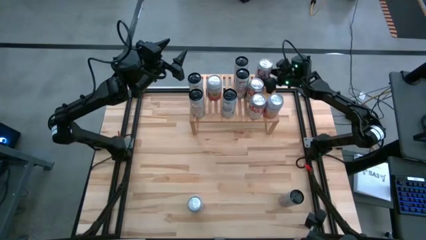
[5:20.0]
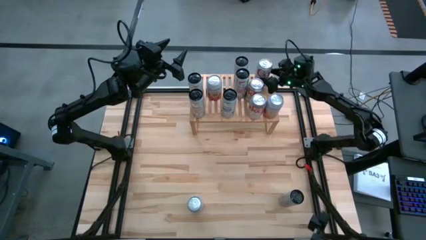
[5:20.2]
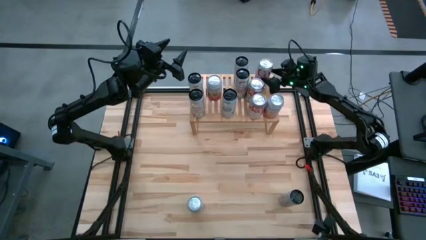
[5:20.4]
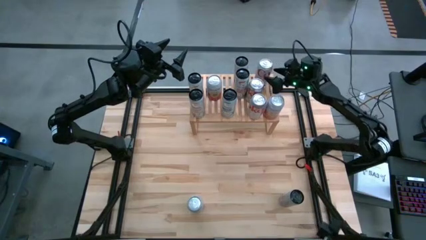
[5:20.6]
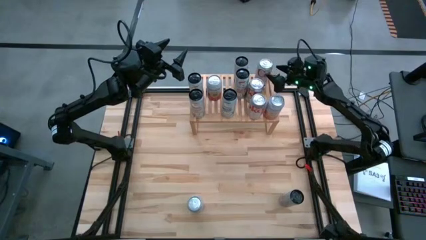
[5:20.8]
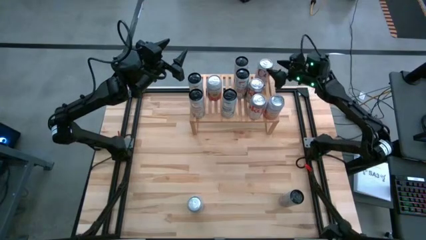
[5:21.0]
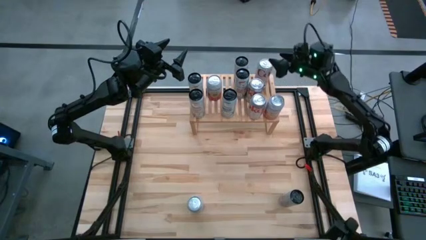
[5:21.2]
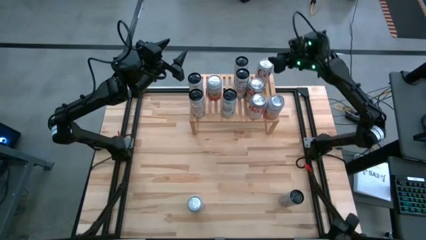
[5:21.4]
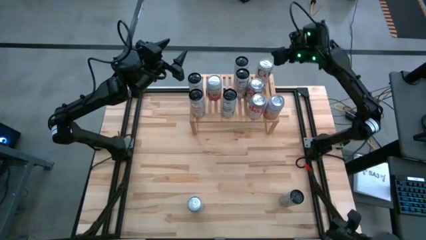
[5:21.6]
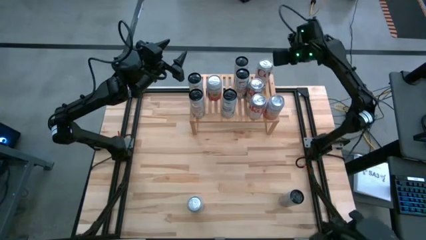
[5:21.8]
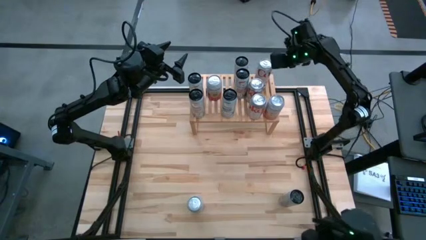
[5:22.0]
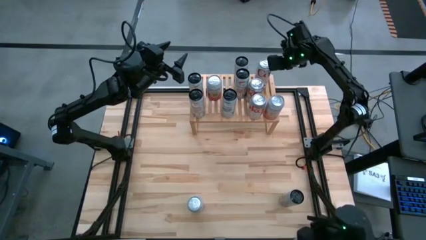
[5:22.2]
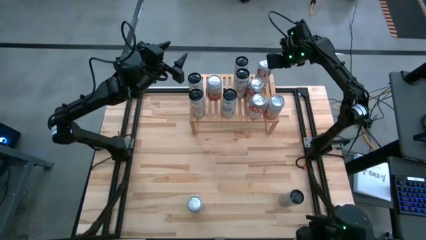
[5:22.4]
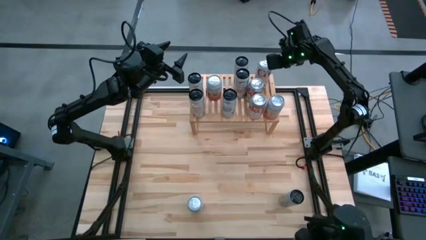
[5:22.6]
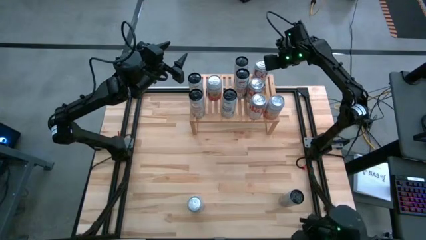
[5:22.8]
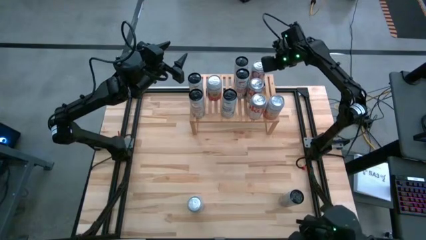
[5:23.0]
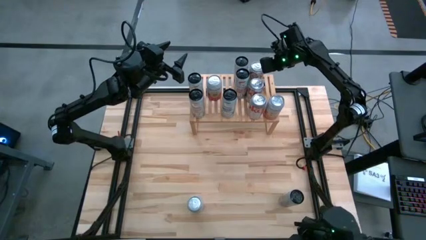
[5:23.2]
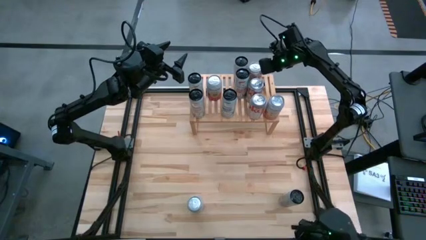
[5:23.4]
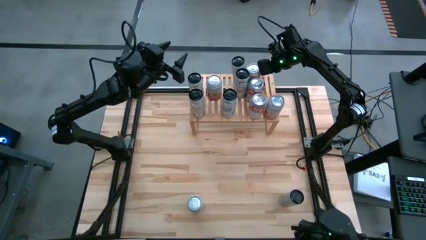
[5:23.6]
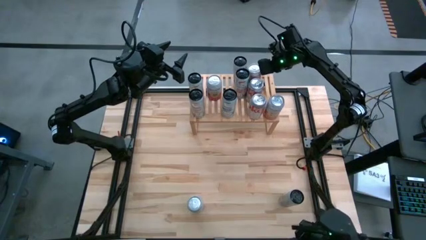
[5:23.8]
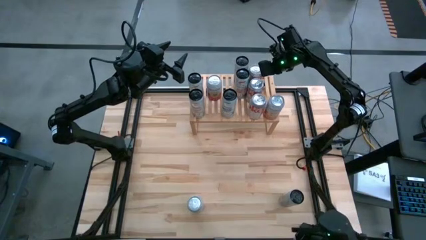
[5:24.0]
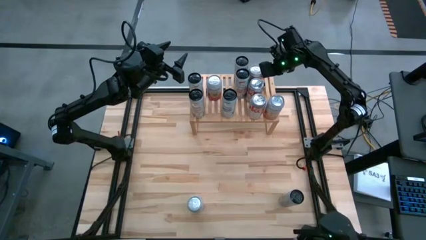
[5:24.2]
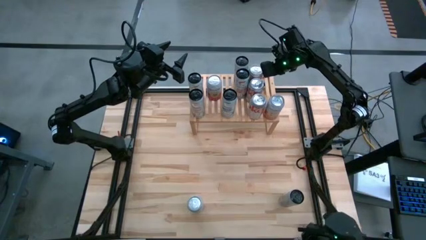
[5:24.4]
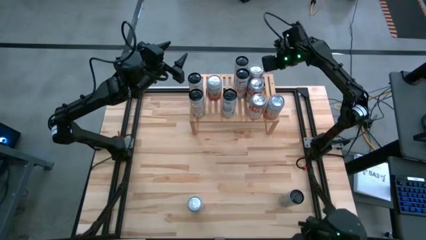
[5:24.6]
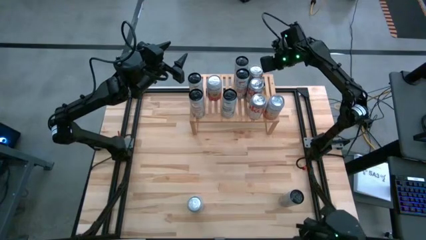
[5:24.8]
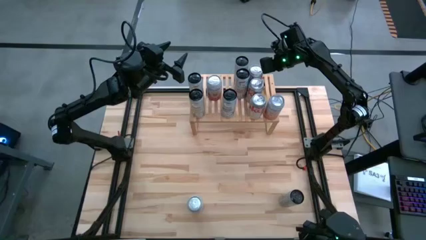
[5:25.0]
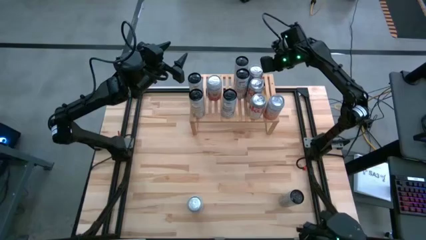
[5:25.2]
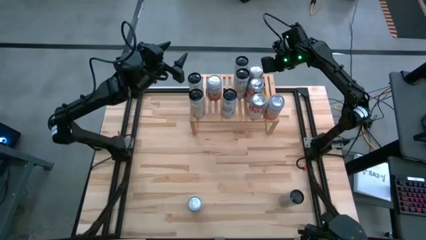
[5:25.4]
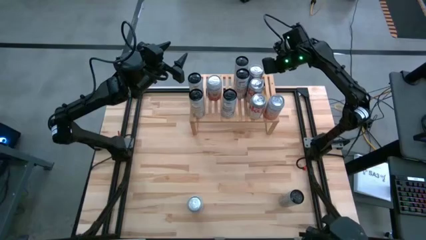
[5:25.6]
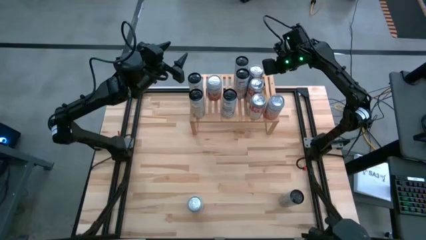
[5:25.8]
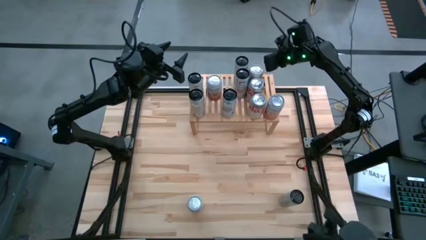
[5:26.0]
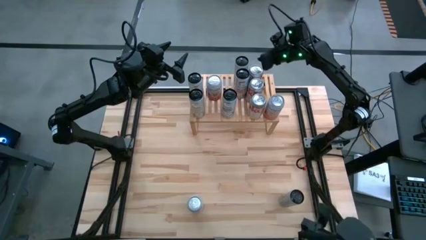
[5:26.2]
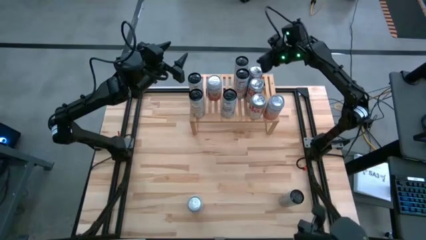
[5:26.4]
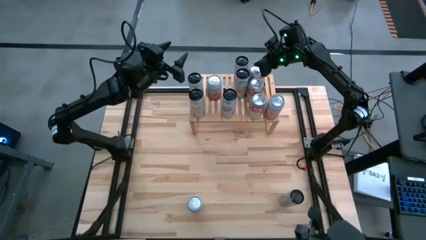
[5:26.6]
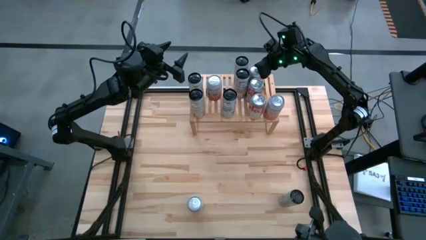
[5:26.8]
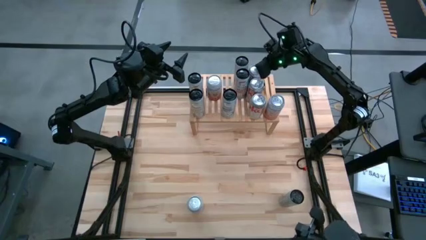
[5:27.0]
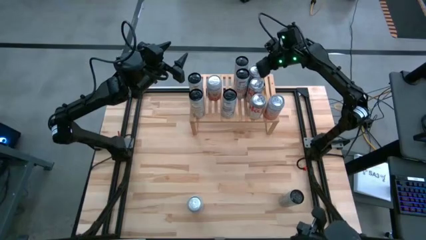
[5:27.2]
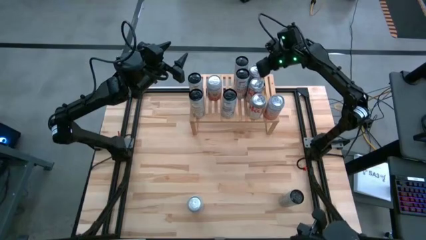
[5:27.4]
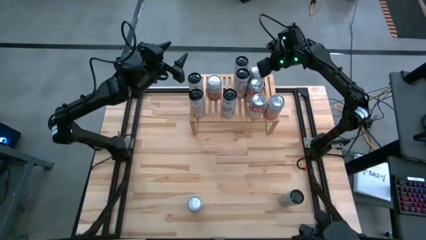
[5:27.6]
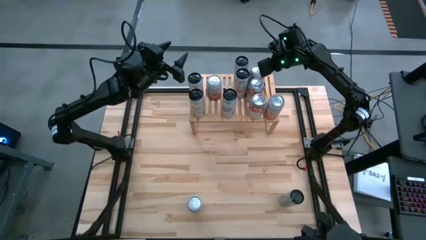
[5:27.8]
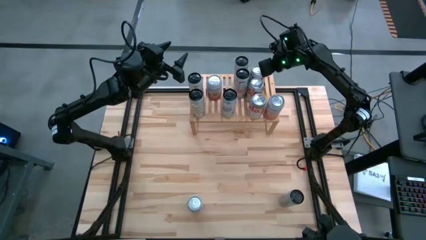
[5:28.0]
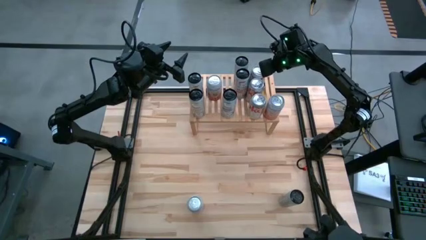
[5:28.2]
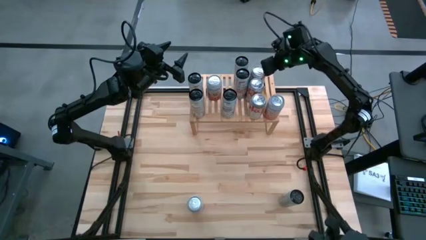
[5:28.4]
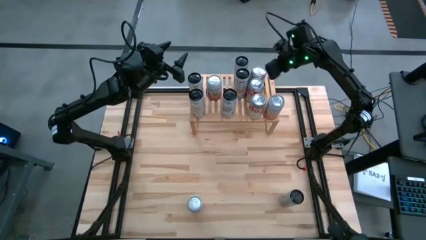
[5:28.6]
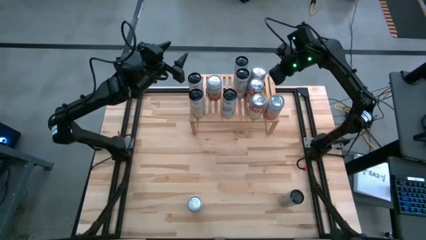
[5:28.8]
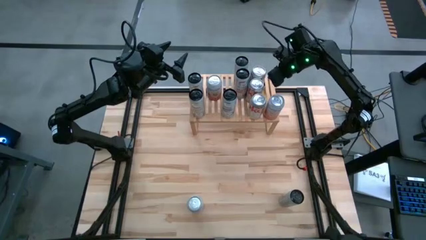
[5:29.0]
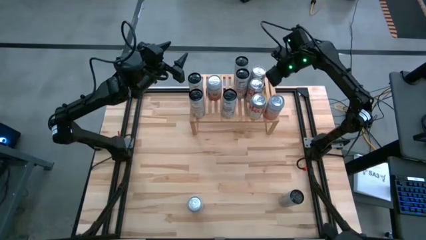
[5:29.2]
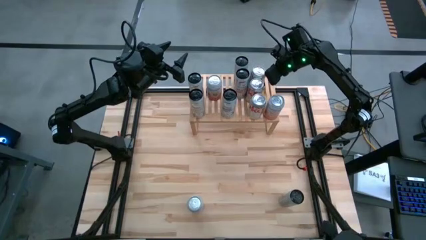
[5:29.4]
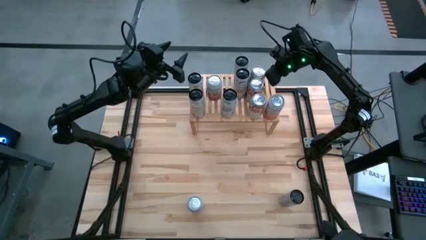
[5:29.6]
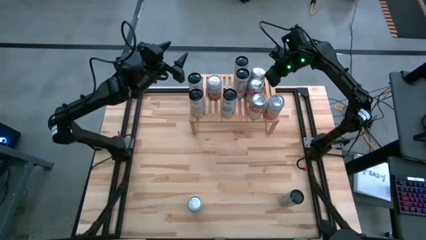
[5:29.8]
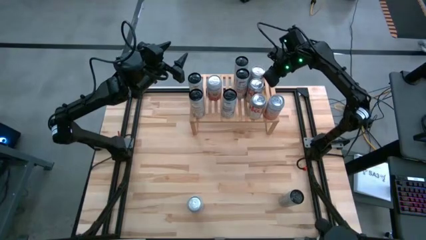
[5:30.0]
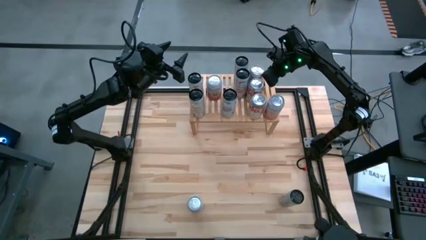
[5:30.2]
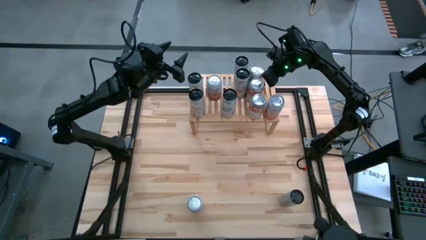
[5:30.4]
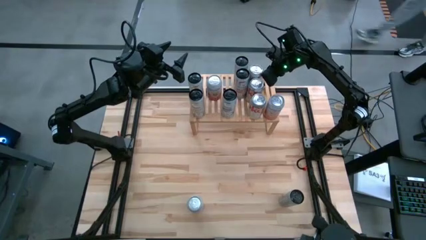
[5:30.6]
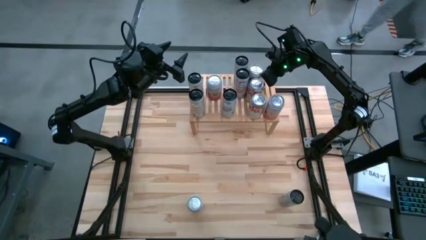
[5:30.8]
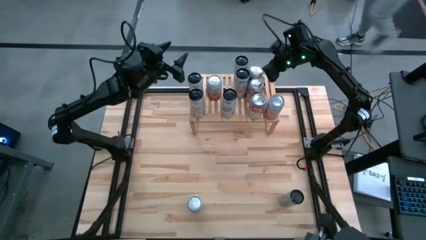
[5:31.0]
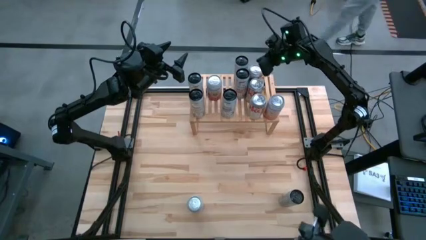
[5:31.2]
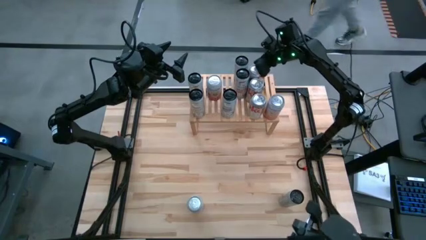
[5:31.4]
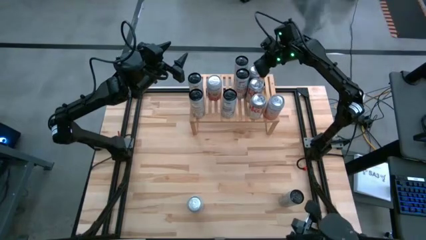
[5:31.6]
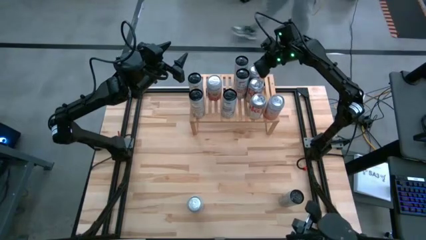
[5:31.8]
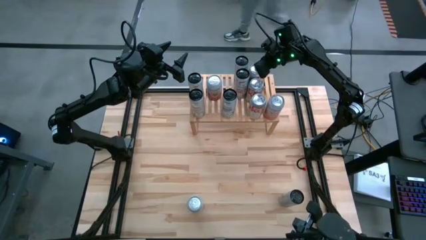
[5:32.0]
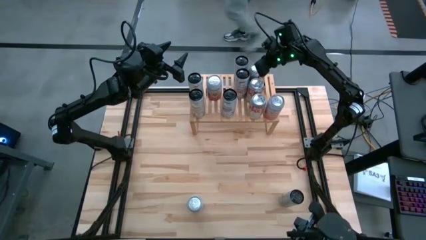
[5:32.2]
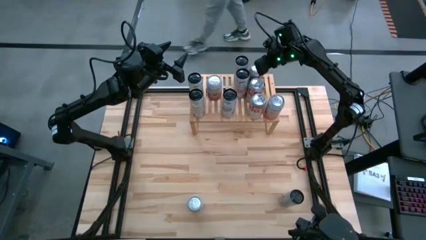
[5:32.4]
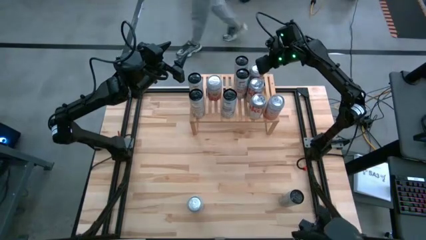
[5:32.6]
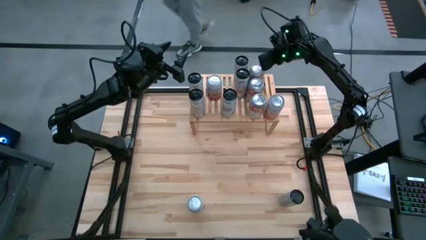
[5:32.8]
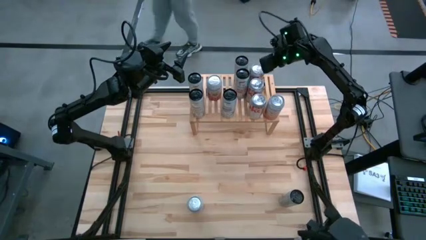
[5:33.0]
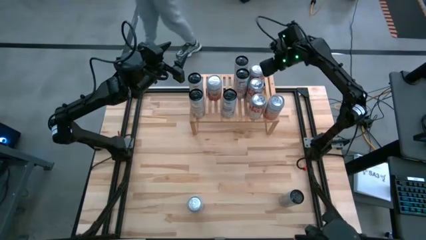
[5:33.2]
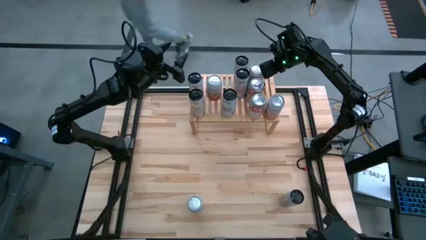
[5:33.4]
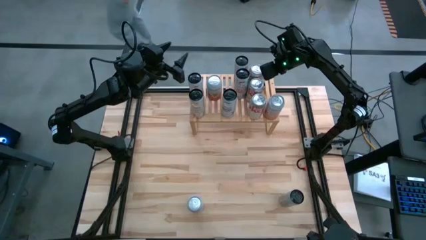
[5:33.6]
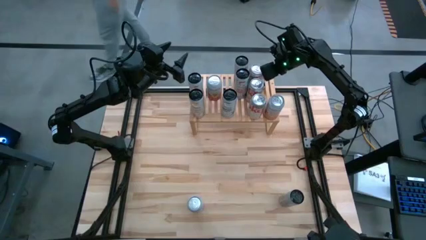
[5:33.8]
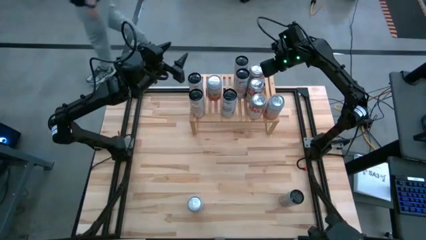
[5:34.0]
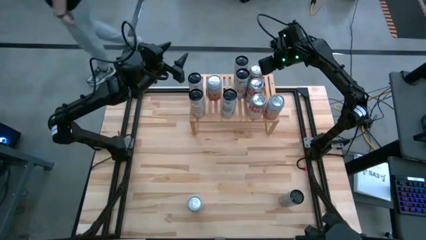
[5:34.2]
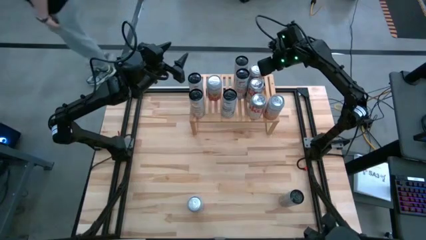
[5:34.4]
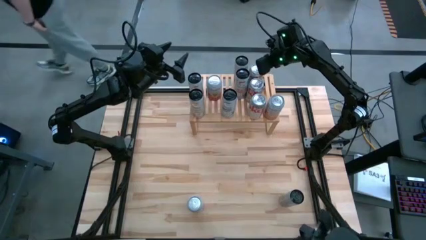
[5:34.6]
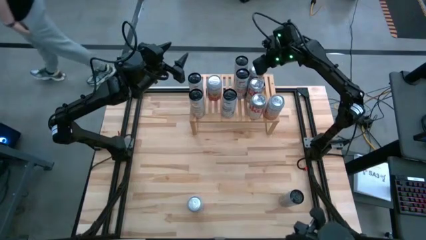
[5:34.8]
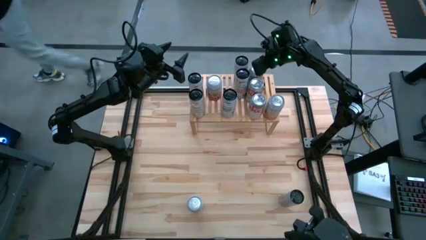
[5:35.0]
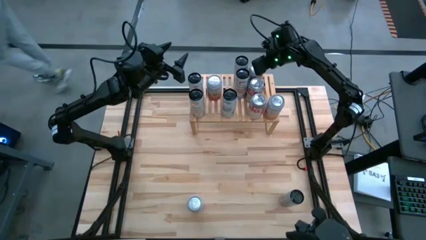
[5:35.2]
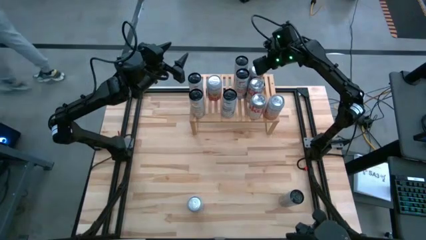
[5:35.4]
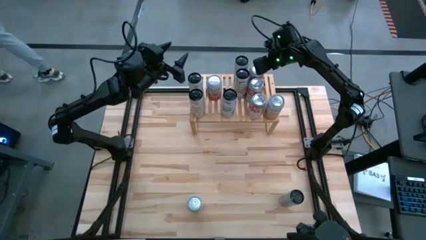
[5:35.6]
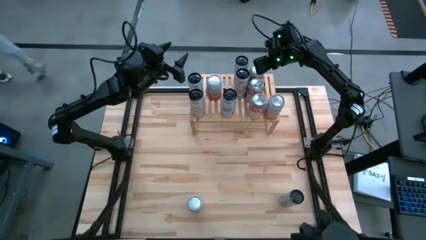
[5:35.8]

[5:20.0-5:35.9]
Task: Place canned beverage on shelf
Put the silver soda can on the shelf aligned with the other silver soda cans

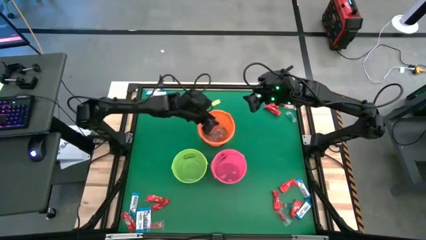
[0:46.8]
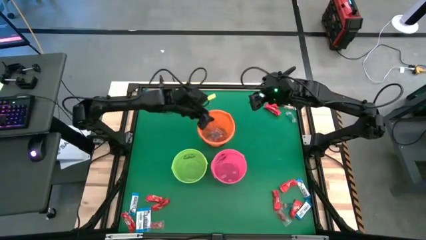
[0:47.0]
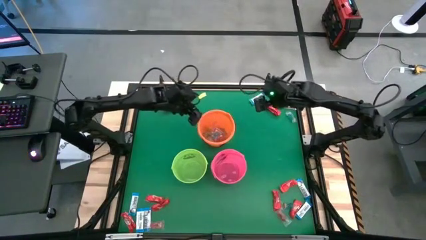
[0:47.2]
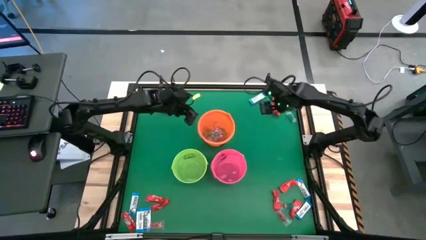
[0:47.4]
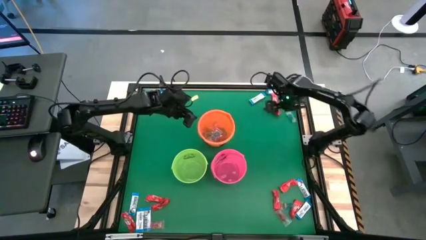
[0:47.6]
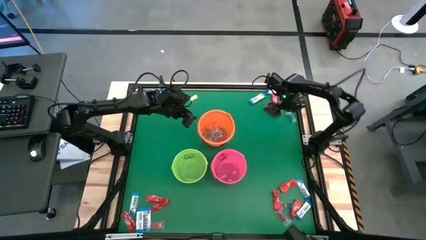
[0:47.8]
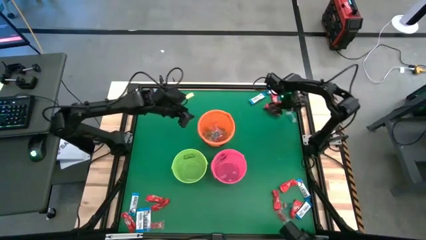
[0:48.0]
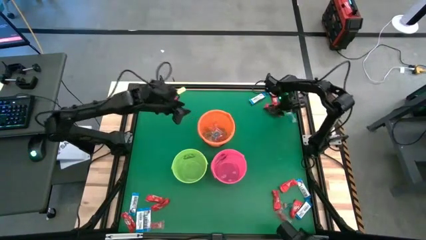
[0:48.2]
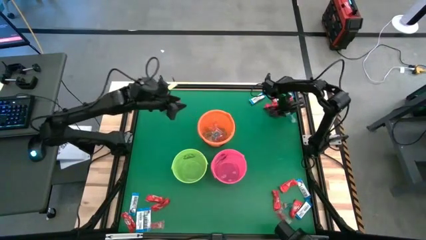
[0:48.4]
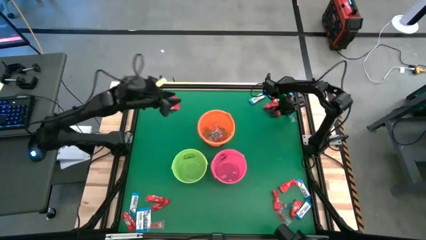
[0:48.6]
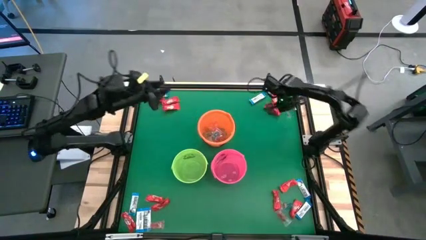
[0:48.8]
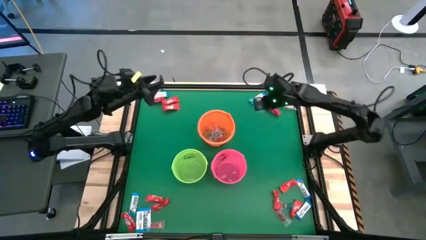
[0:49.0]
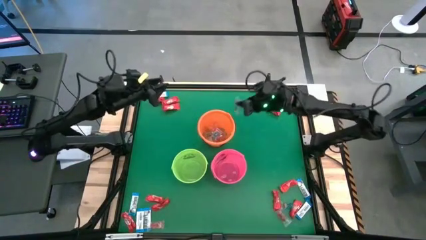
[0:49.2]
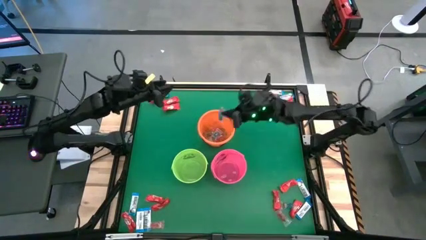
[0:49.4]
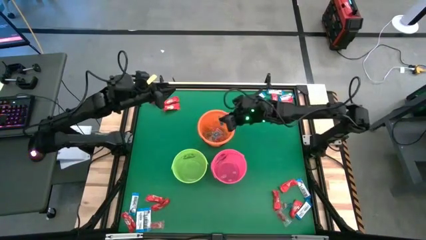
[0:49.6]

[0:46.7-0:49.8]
Task: Sort candy by brand, put in halloween buckets
Put the blue gummy into the orange bucket
